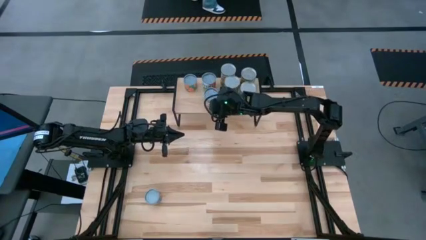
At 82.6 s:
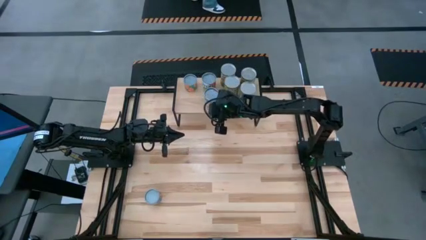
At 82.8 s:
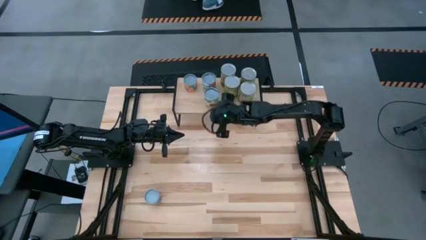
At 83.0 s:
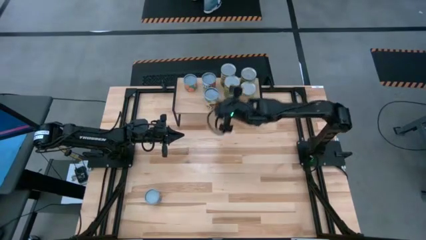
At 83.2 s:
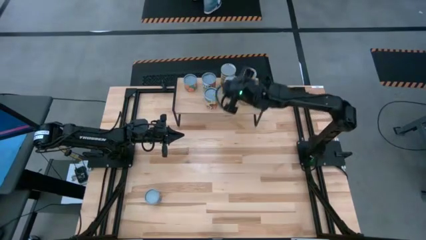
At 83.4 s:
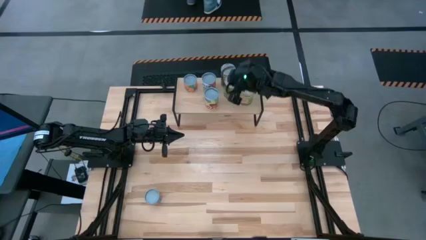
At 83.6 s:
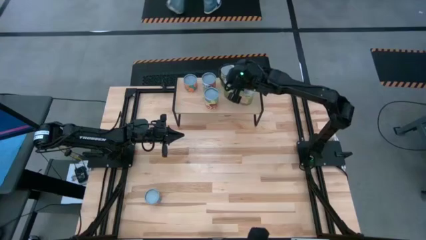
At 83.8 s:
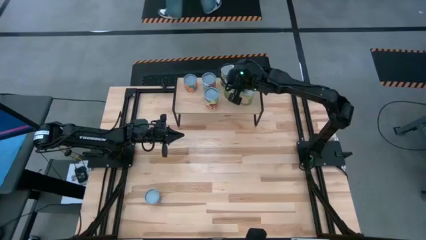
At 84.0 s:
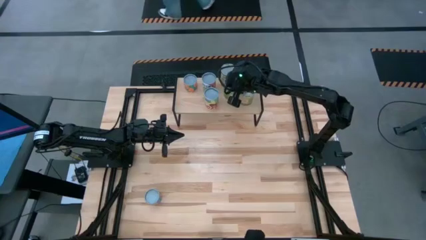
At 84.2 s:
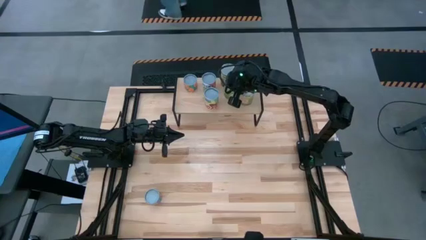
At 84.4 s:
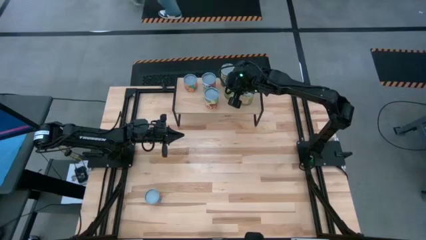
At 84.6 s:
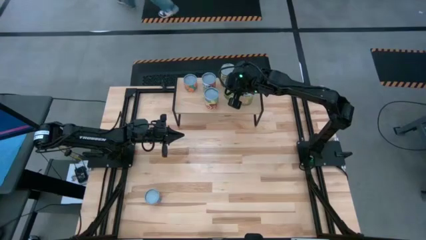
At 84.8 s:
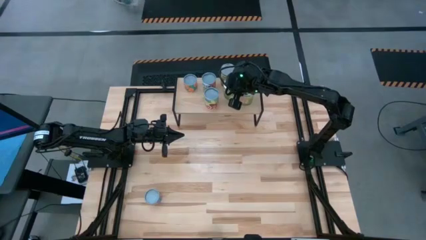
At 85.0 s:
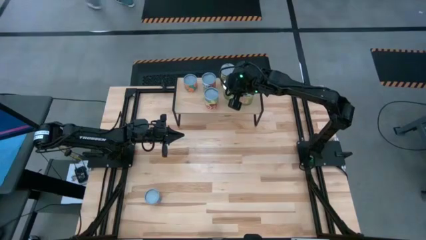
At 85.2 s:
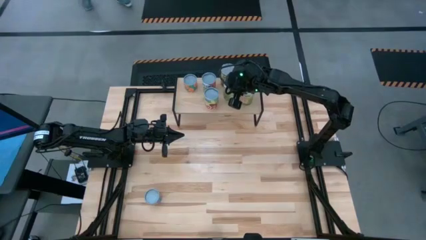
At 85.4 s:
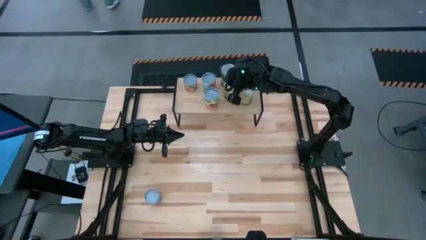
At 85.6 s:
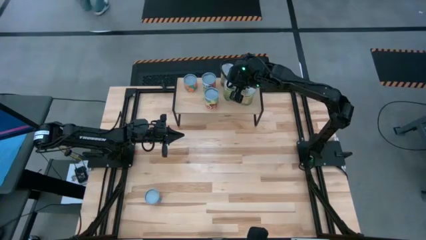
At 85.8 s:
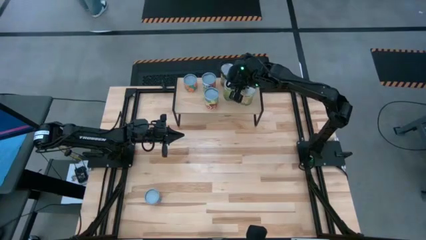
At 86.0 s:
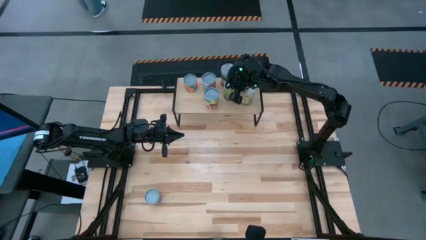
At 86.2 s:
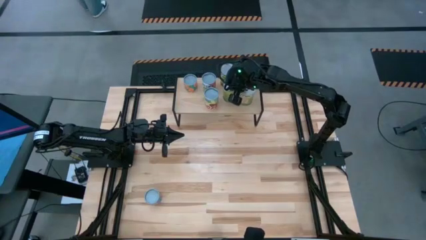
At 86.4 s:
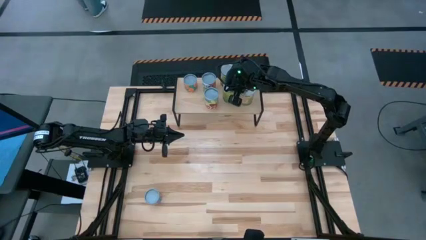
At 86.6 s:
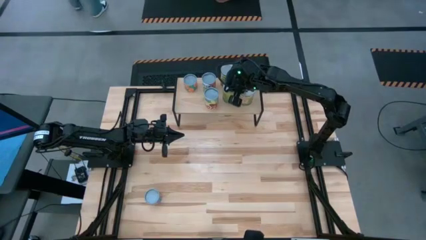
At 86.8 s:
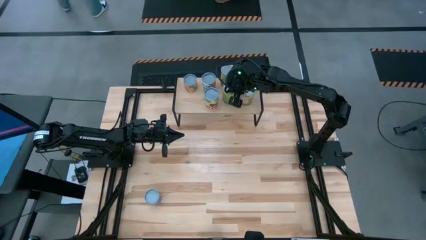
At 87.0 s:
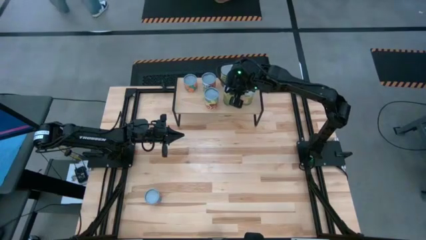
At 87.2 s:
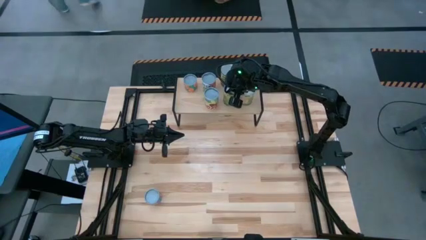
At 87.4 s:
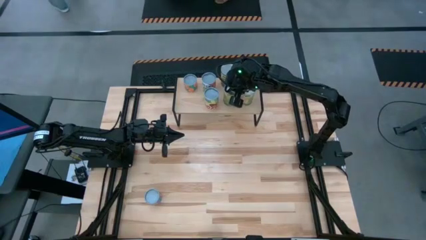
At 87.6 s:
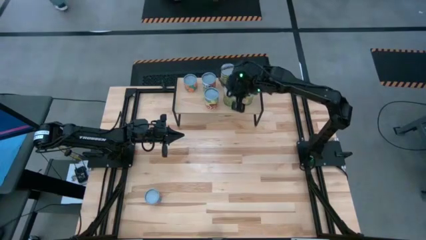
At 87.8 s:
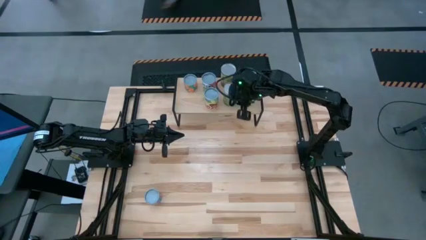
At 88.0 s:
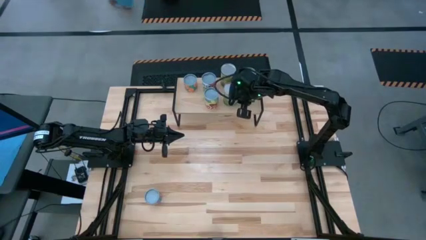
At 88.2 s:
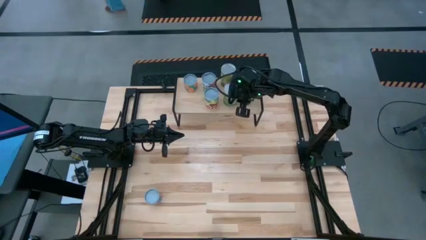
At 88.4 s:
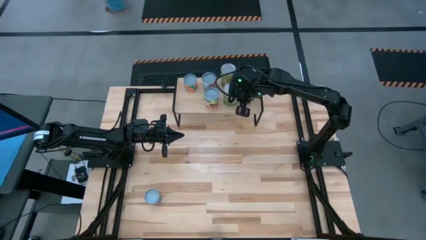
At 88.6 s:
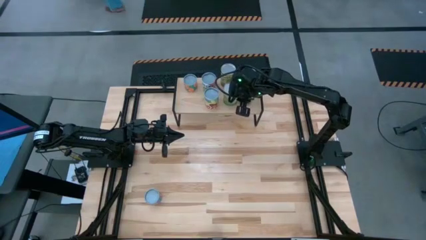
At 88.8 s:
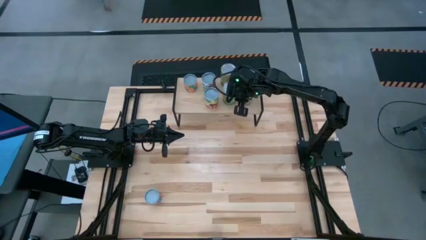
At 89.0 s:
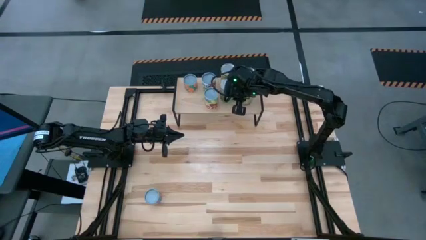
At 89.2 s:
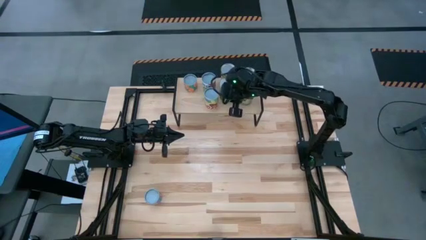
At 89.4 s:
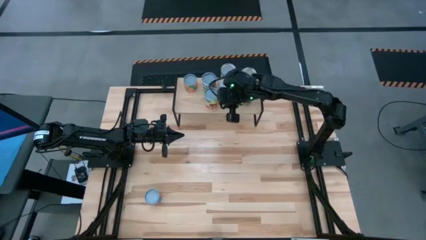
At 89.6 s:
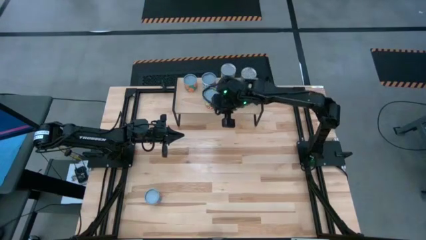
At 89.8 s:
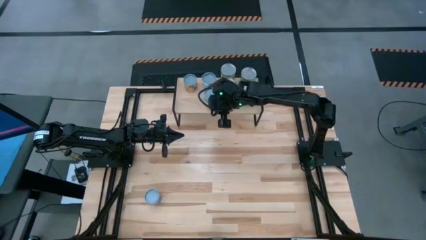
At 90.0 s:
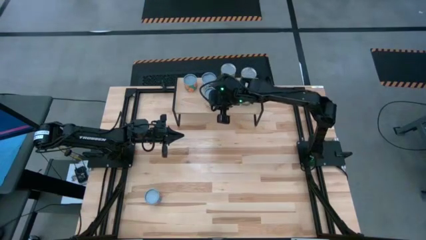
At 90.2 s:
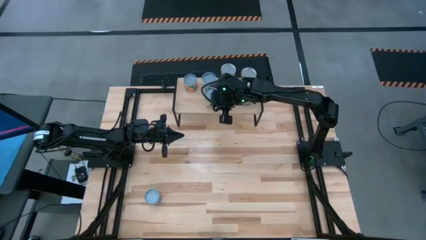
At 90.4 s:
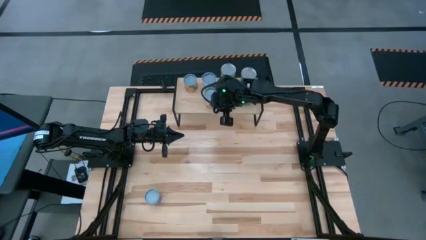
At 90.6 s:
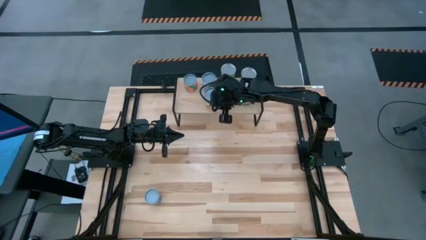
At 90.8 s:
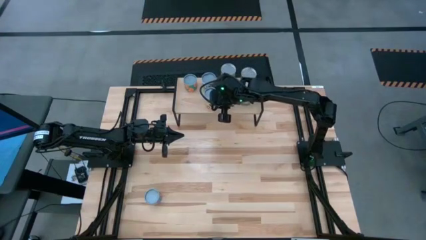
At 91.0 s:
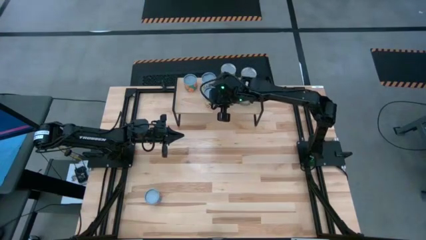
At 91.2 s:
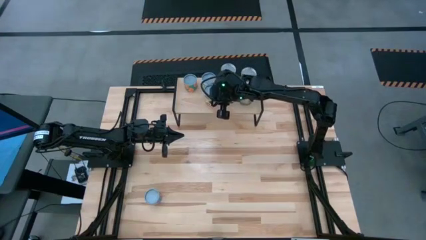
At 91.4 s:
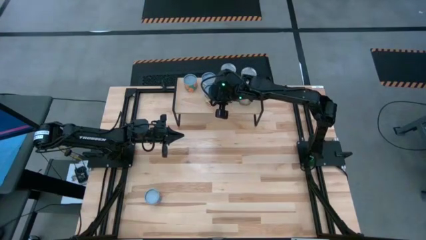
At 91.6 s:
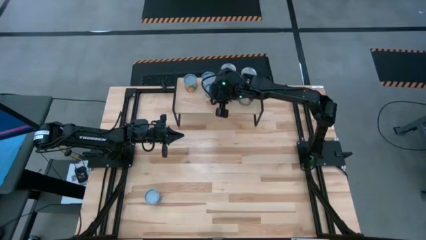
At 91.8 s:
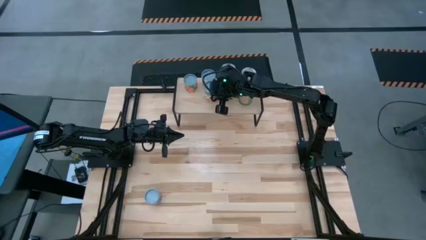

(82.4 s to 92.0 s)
Task: Pick and place cans onto a shelf
Adjust the canned fruits on the shelf

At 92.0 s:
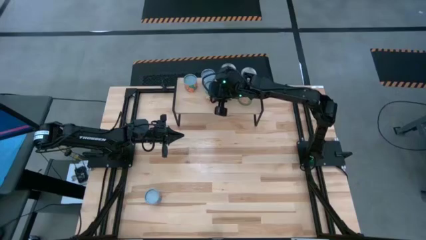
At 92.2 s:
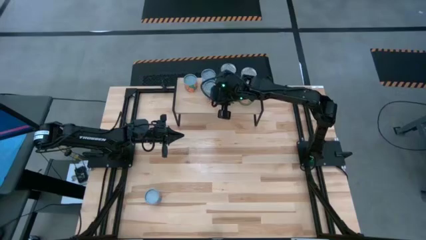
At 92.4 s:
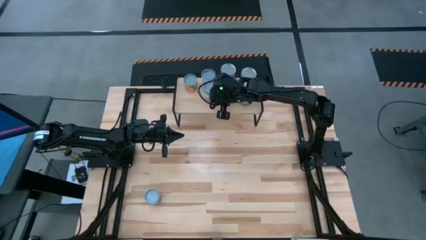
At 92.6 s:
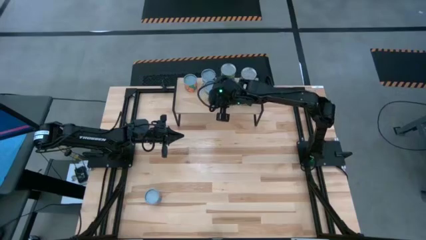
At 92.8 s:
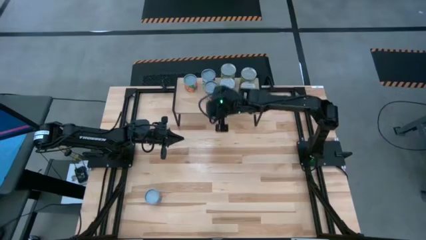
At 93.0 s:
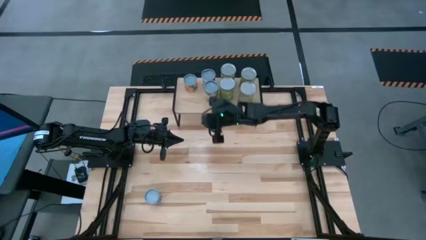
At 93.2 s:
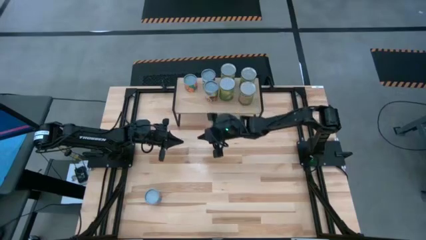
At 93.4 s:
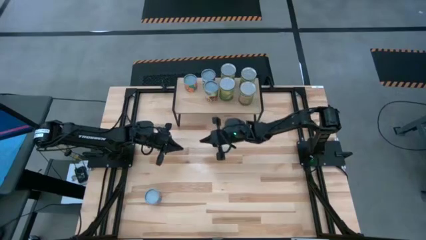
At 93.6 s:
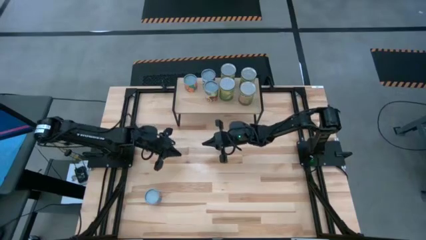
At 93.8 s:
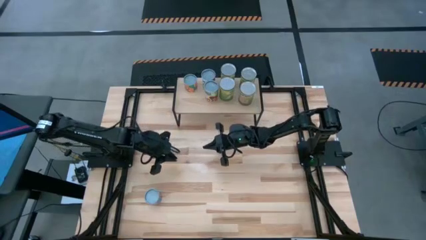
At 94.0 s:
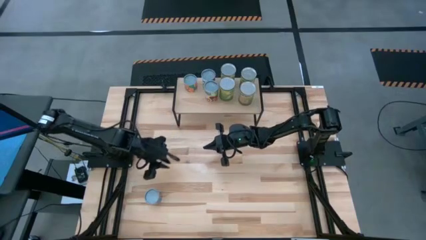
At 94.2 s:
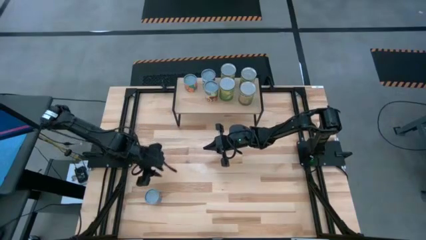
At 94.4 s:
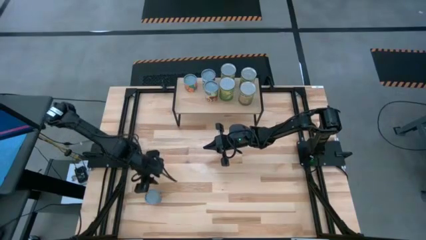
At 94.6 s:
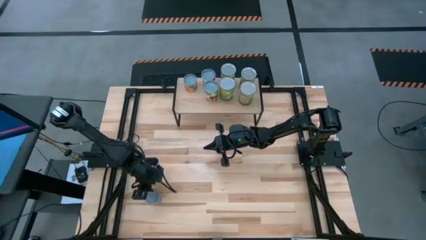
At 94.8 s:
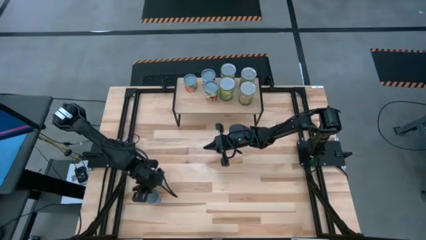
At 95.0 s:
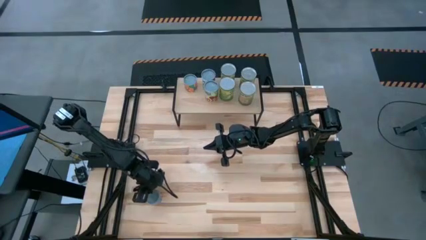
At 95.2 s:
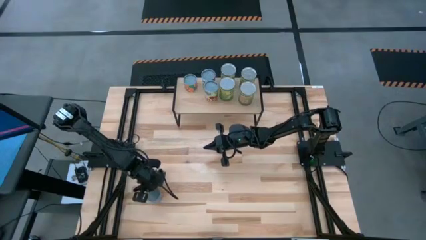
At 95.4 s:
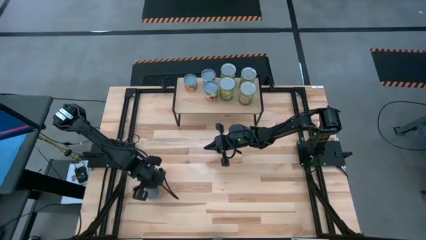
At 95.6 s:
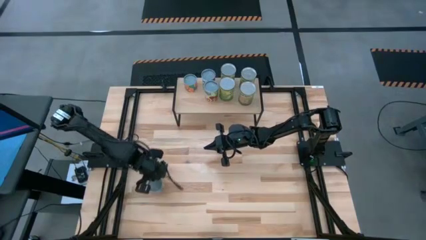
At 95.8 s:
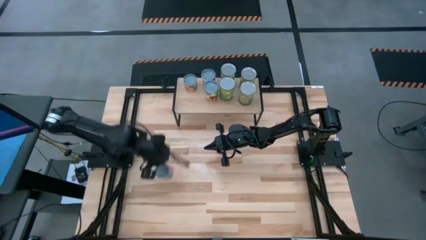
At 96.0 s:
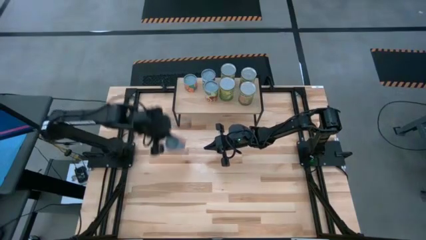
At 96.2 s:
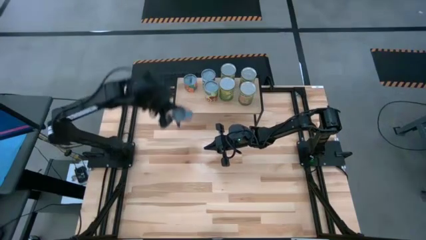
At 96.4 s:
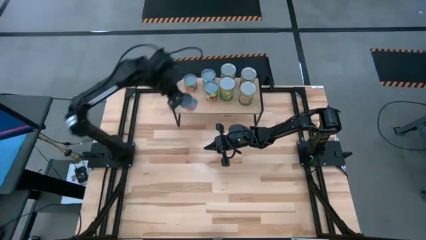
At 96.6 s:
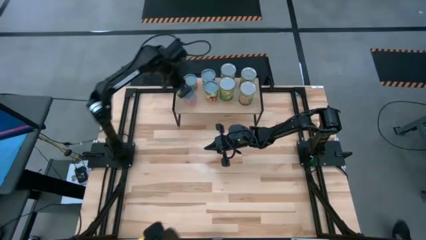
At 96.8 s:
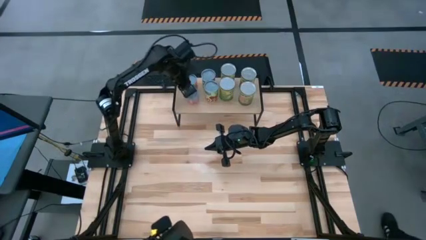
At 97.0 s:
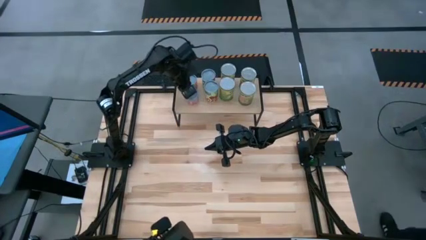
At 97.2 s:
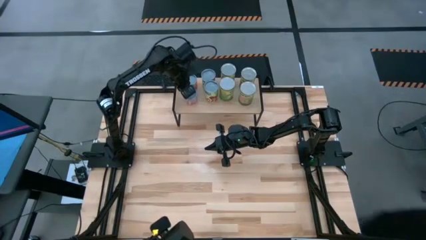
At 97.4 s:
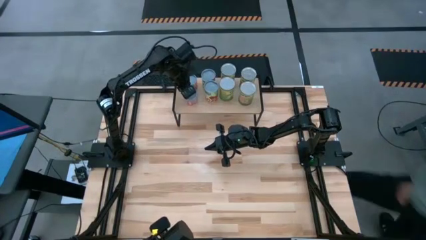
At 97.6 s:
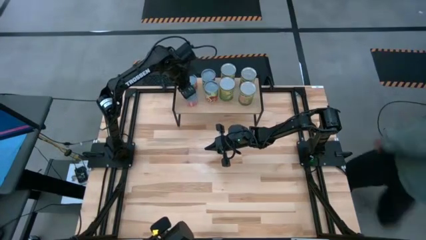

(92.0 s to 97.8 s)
Put the canned corn on the shelf
